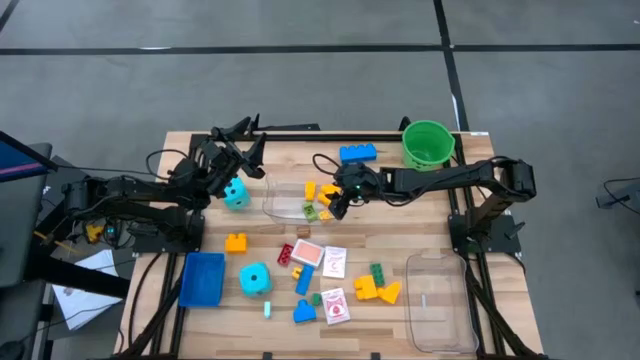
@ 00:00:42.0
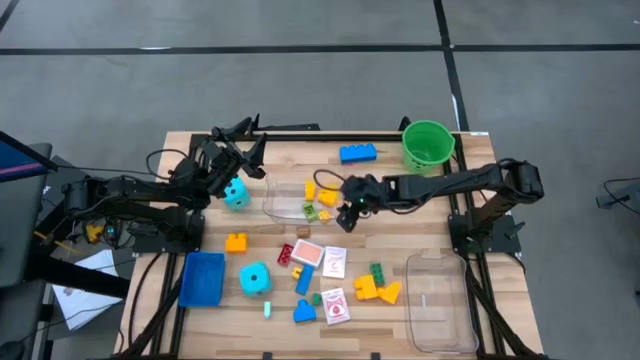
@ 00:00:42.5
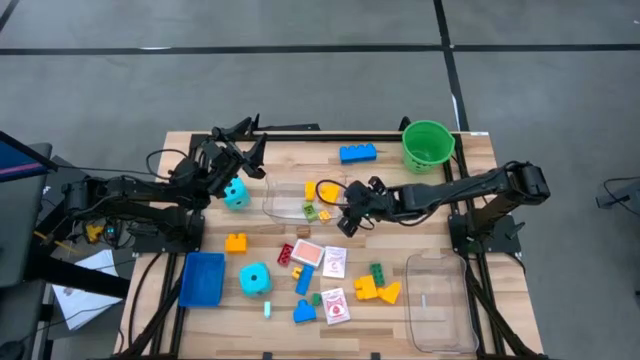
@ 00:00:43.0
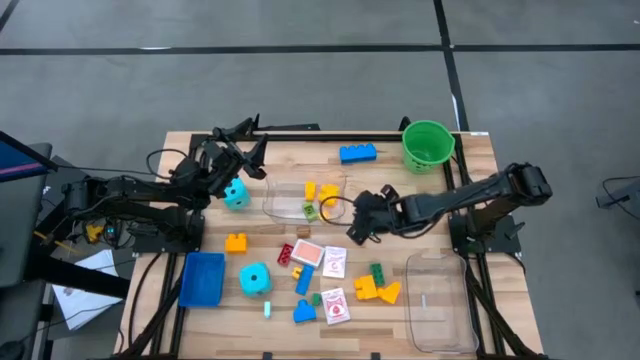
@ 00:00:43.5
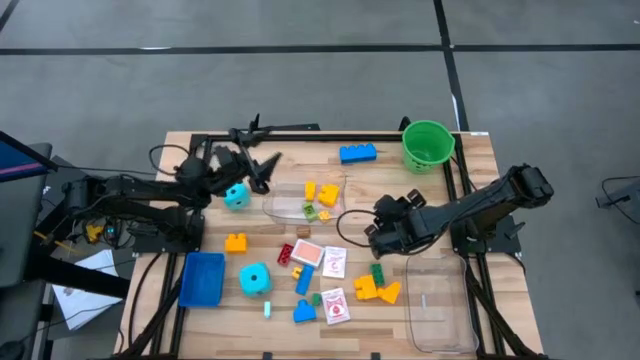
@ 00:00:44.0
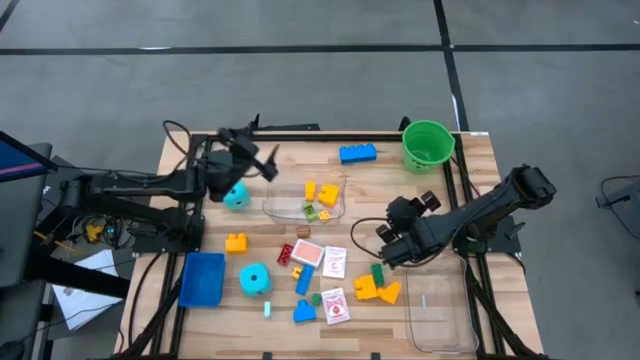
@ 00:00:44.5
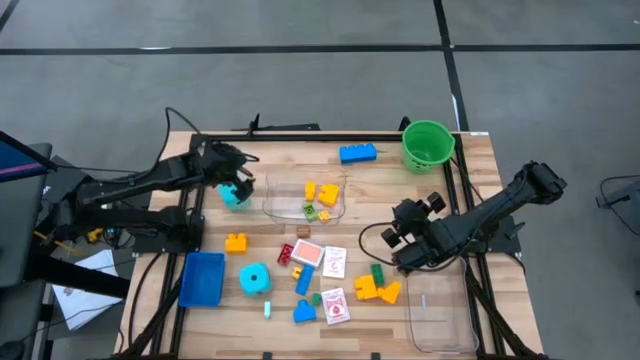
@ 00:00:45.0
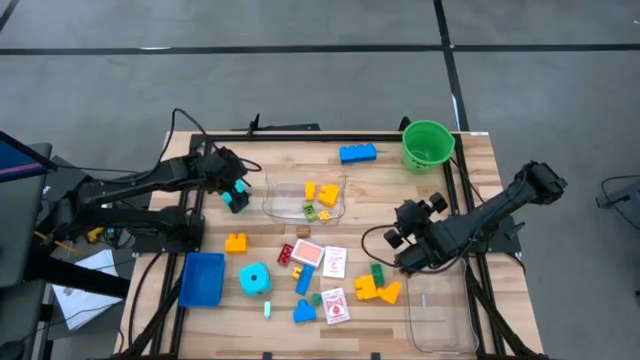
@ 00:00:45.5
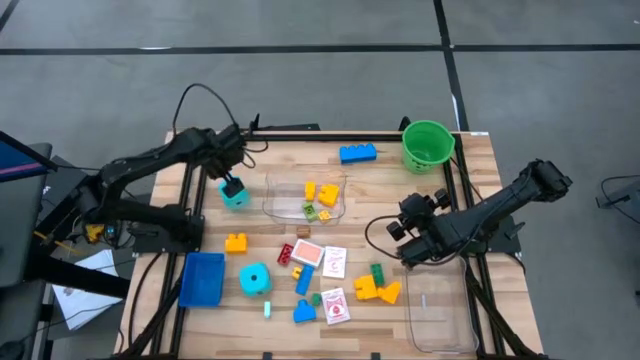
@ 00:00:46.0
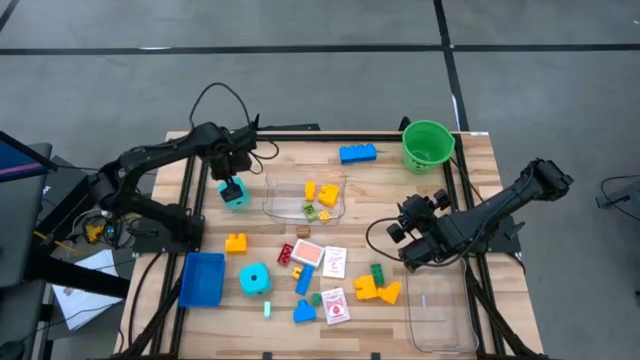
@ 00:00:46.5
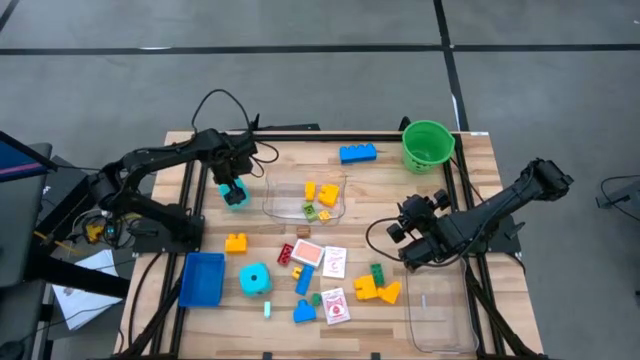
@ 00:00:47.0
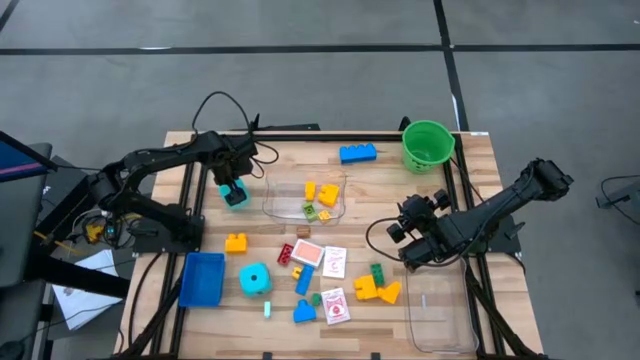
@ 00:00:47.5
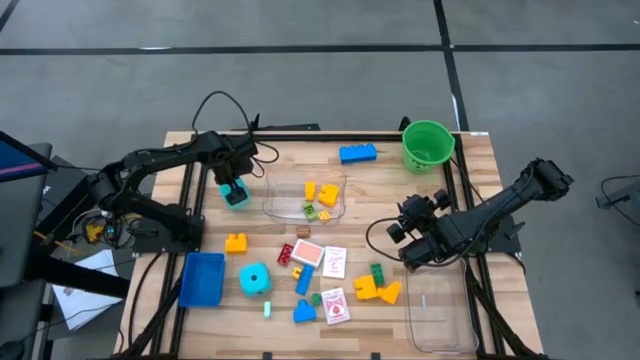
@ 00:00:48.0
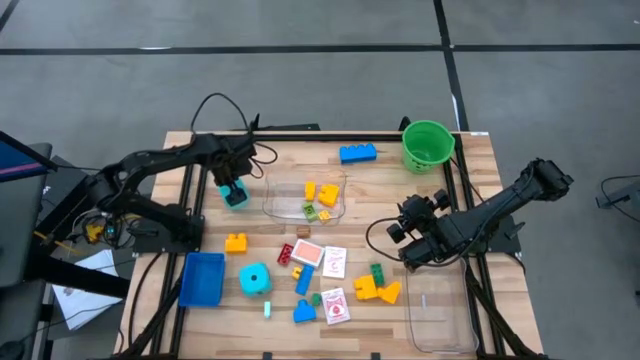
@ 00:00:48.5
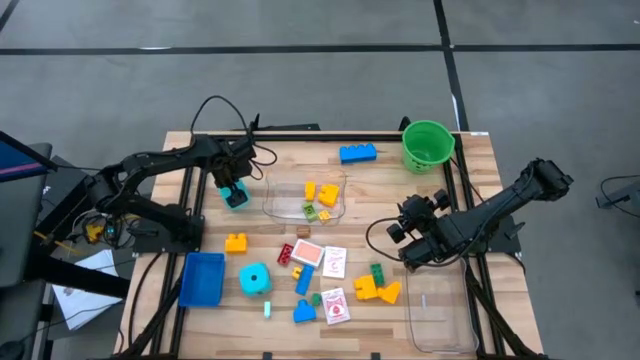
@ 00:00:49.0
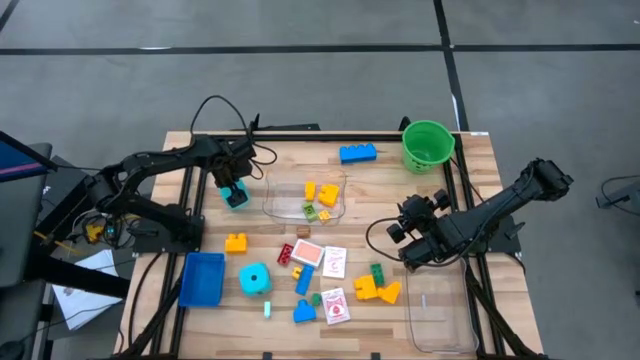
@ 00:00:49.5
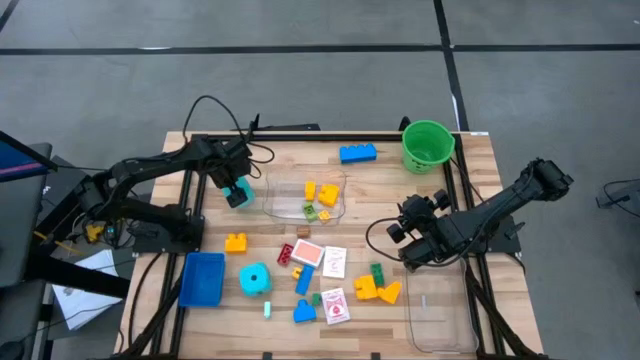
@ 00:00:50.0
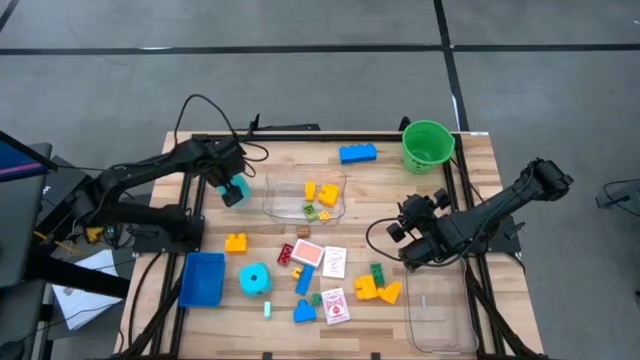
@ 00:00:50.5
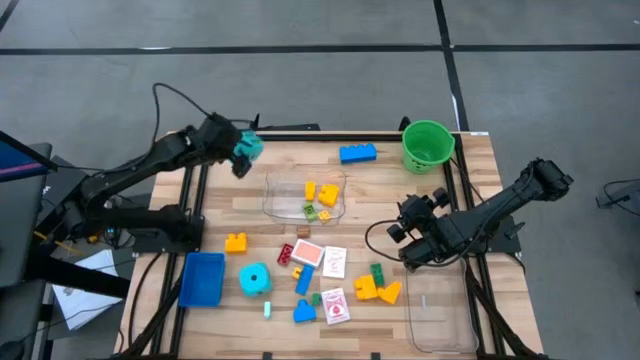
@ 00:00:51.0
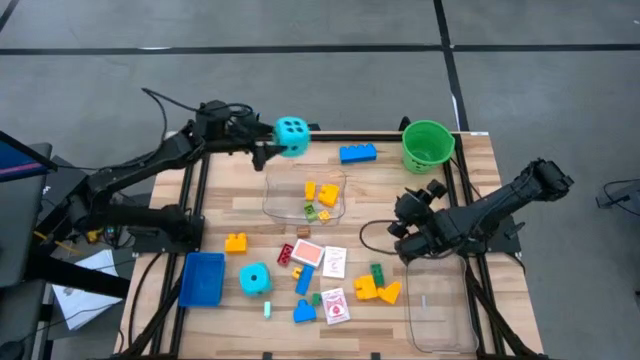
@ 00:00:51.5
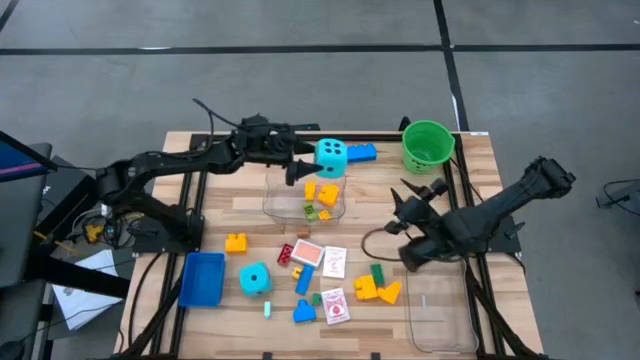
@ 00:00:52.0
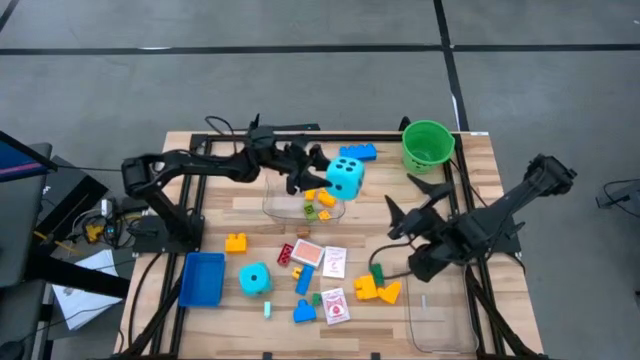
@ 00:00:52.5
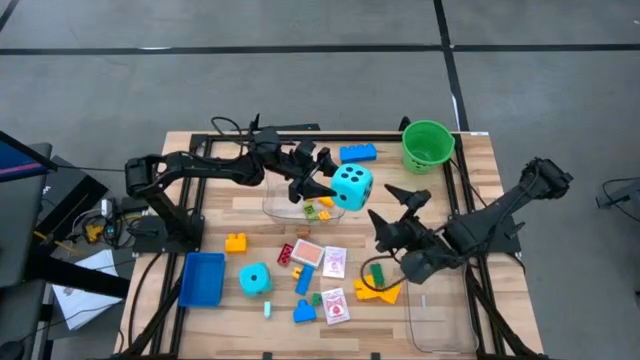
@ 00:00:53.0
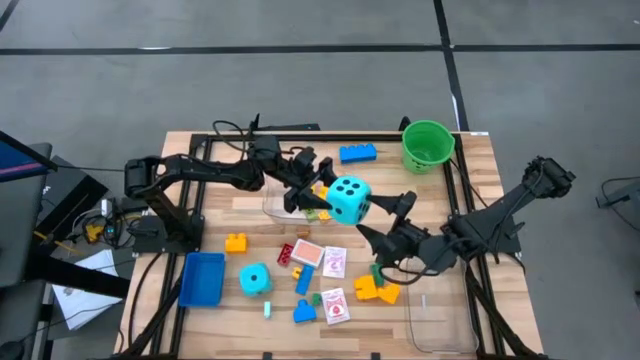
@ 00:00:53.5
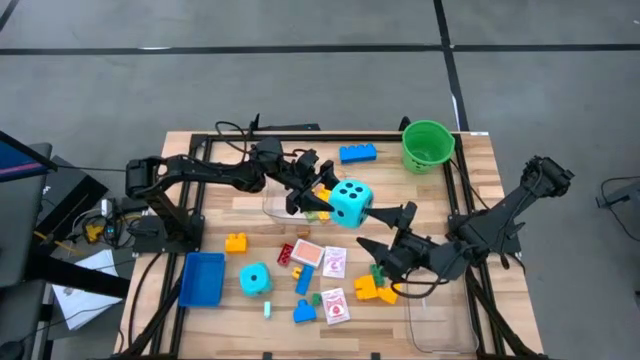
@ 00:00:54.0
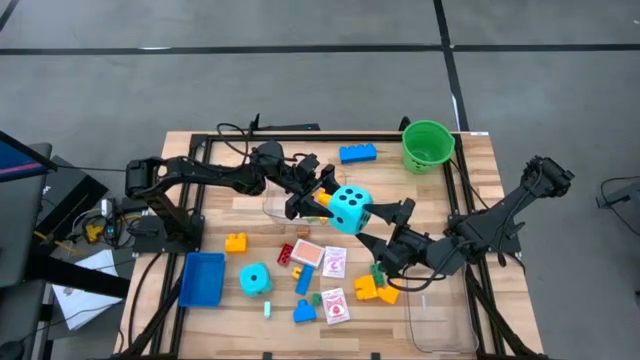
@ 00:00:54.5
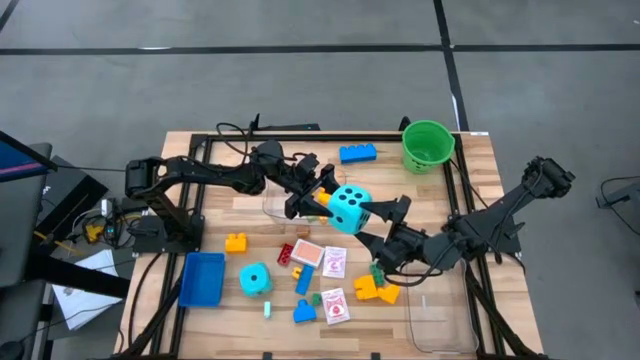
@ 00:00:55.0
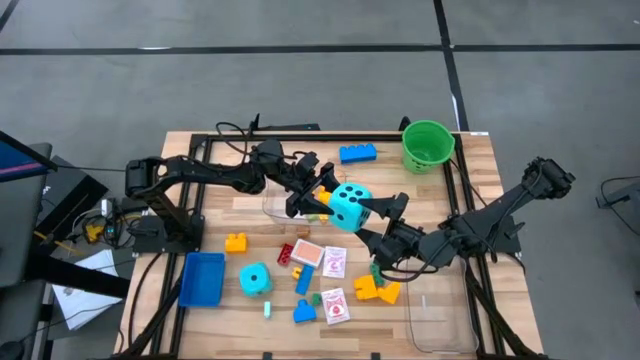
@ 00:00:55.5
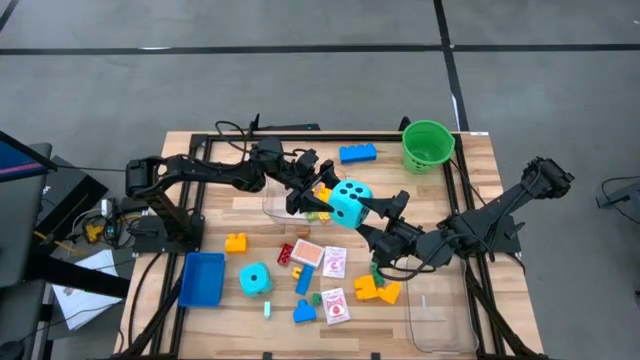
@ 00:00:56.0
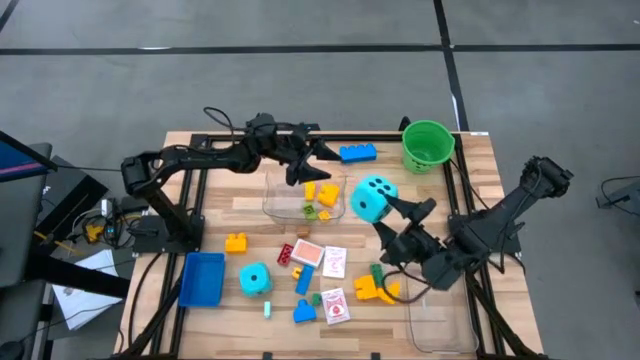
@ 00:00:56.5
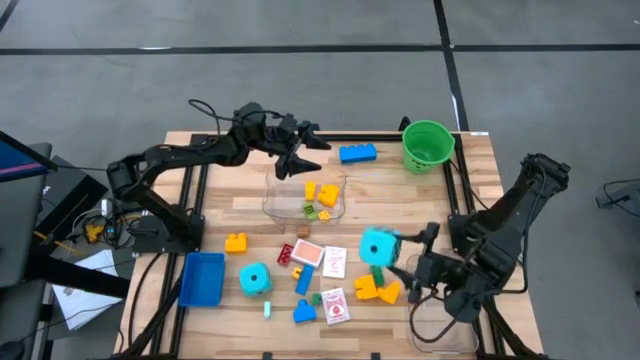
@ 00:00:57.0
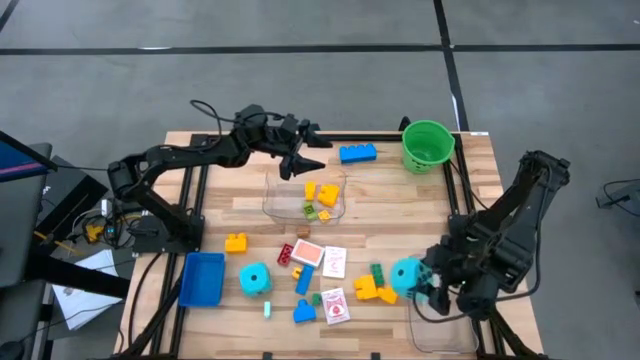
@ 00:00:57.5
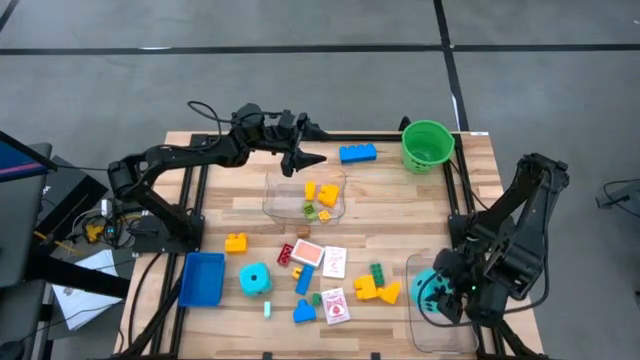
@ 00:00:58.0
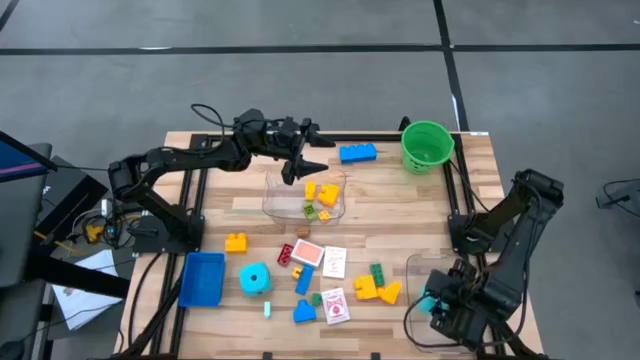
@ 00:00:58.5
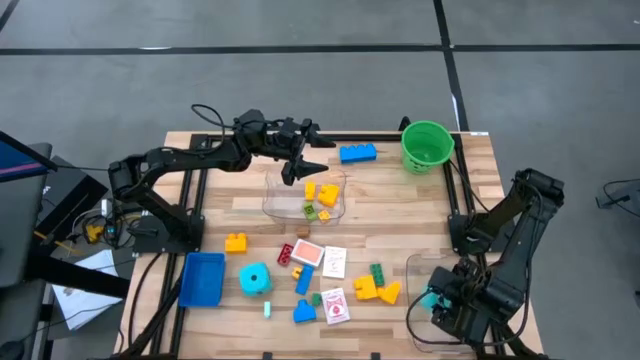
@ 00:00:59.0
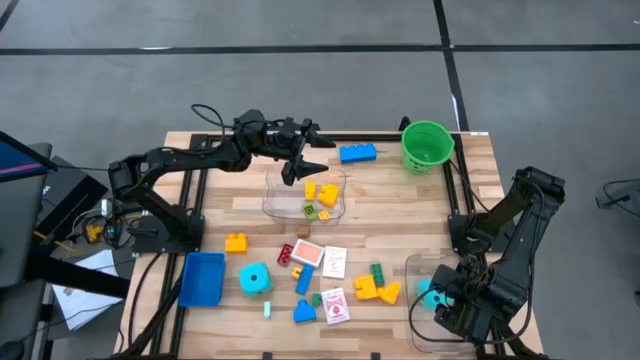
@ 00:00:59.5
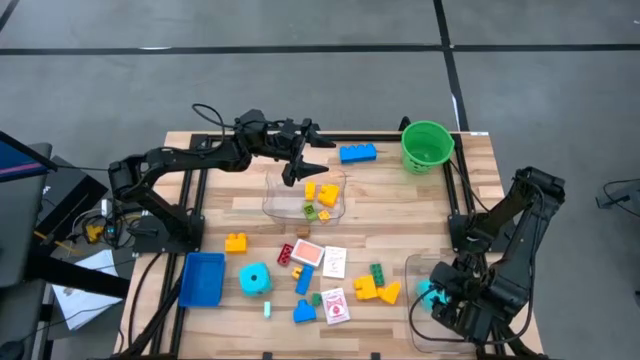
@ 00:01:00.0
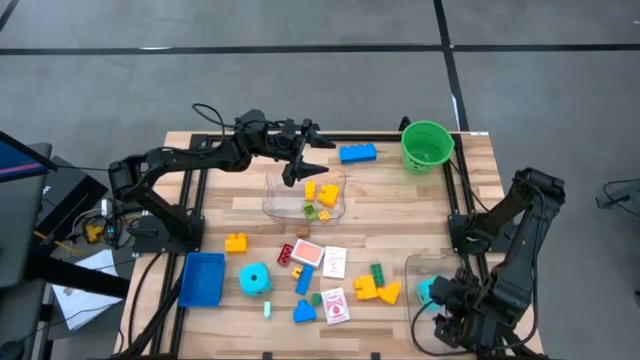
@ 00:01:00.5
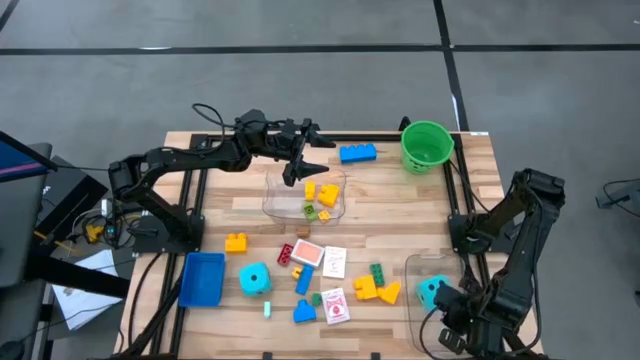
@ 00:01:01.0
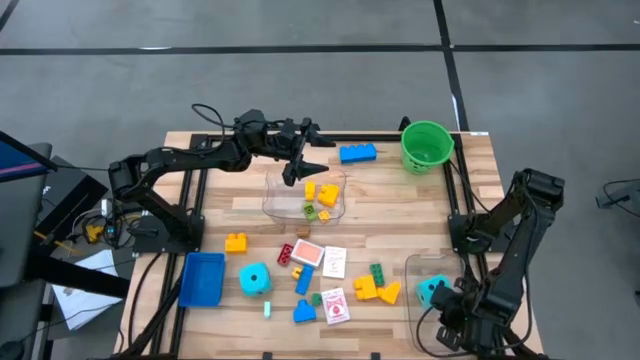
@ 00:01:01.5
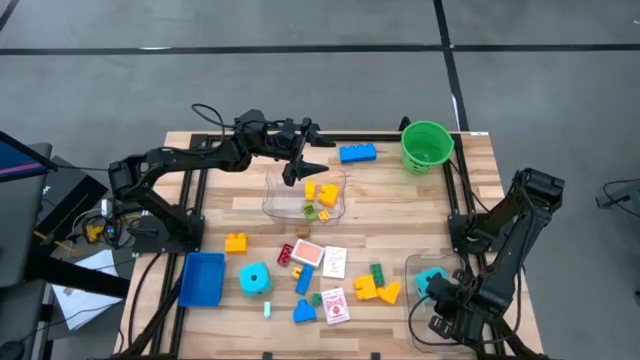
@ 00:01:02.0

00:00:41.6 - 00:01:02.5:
Task: Pick & Place Toys
Put the blue die into the bottom transparent bin
